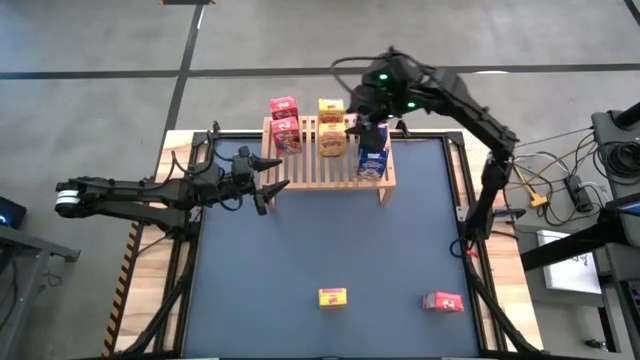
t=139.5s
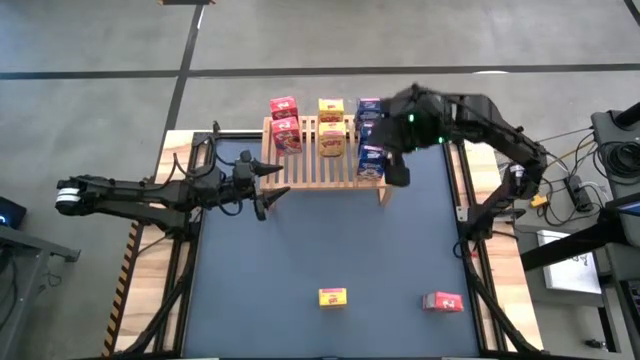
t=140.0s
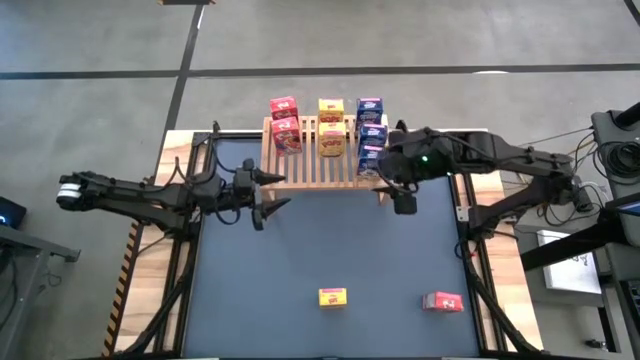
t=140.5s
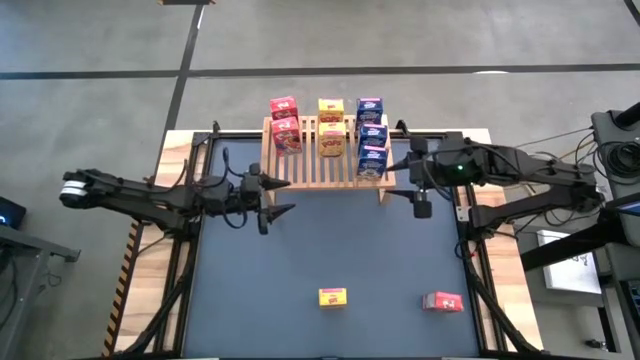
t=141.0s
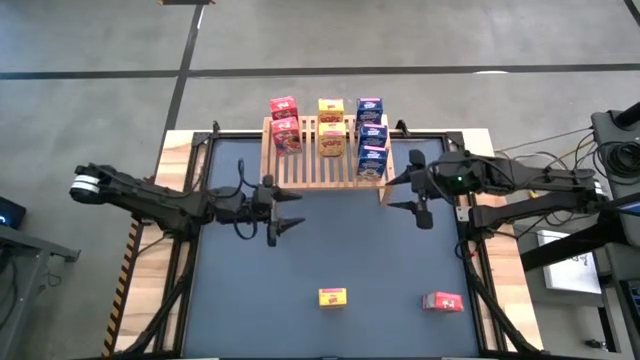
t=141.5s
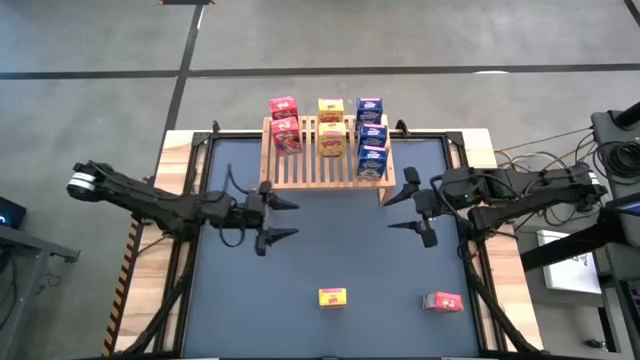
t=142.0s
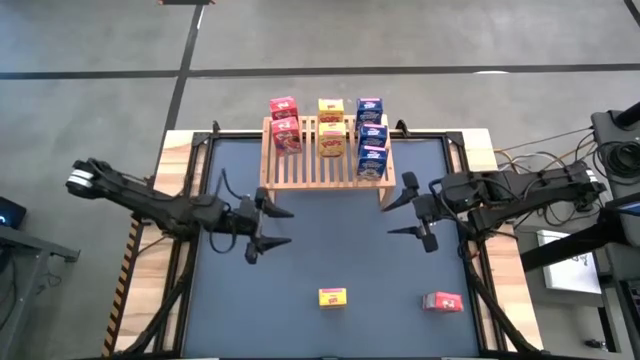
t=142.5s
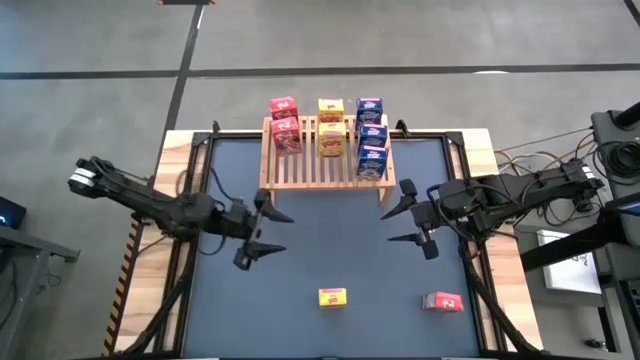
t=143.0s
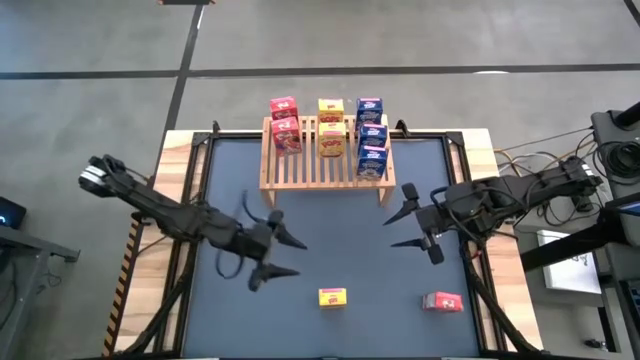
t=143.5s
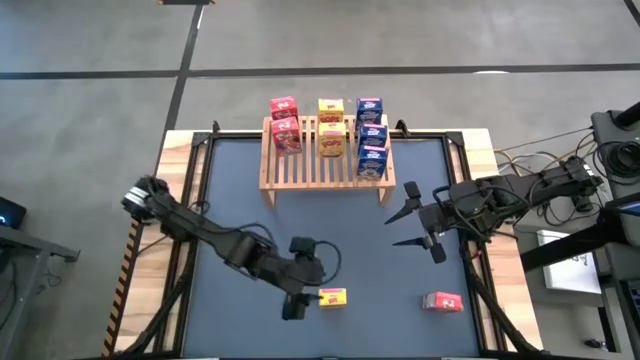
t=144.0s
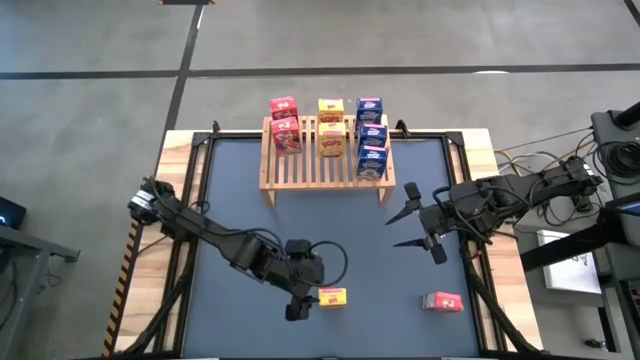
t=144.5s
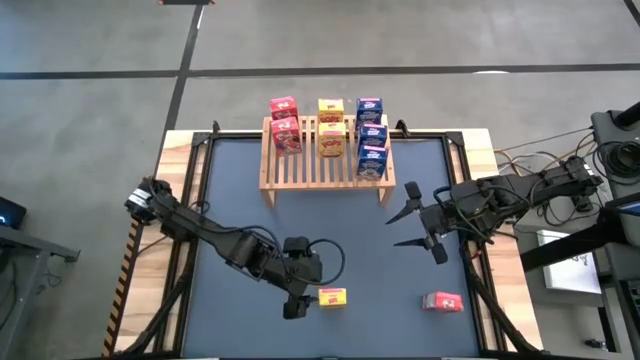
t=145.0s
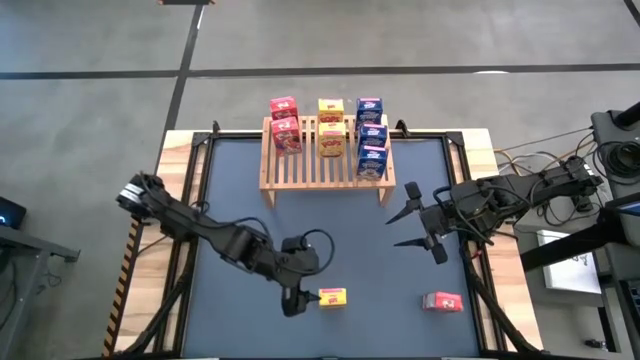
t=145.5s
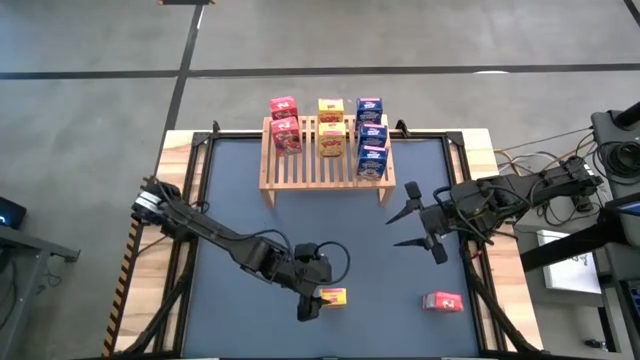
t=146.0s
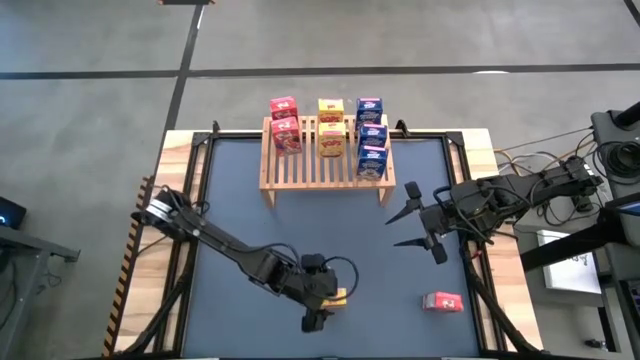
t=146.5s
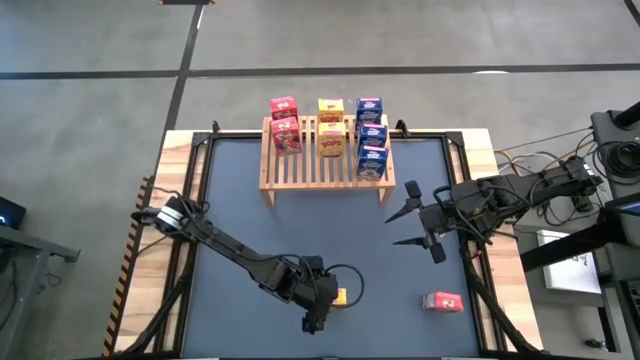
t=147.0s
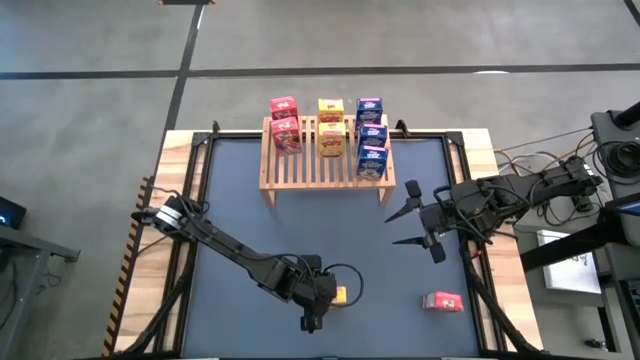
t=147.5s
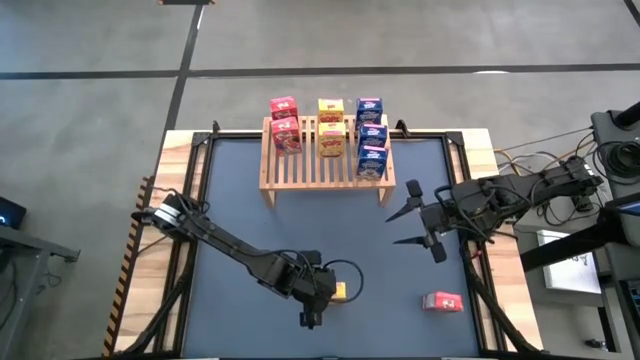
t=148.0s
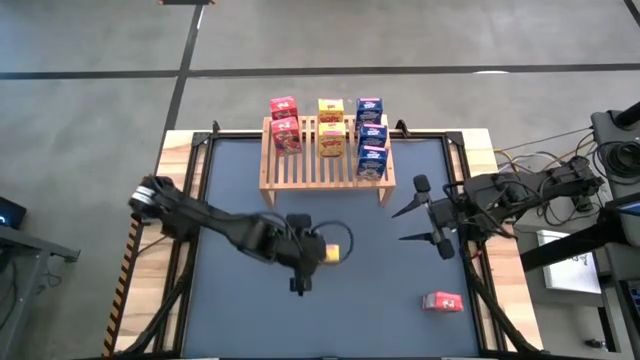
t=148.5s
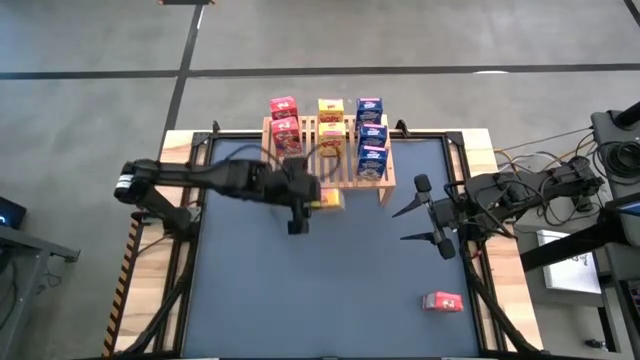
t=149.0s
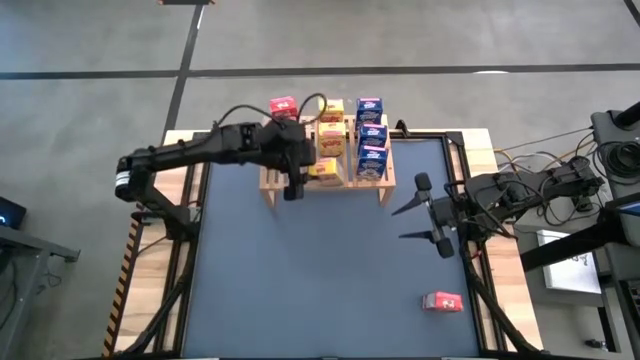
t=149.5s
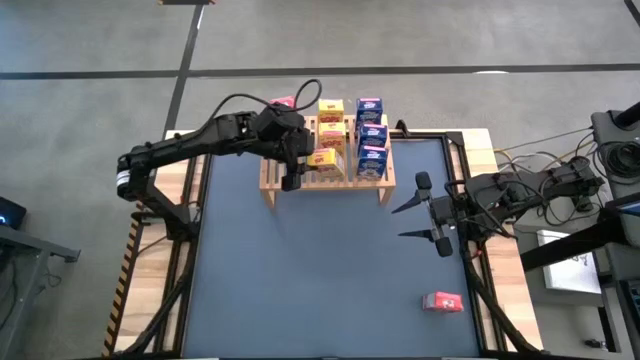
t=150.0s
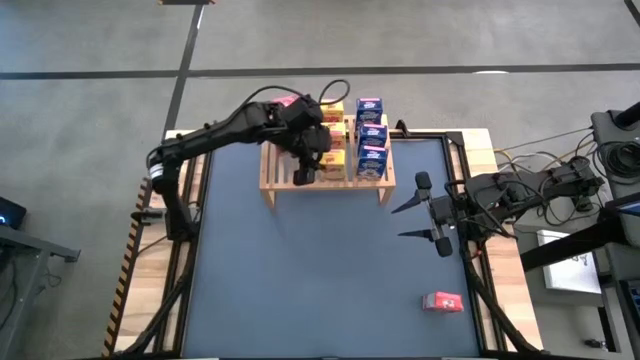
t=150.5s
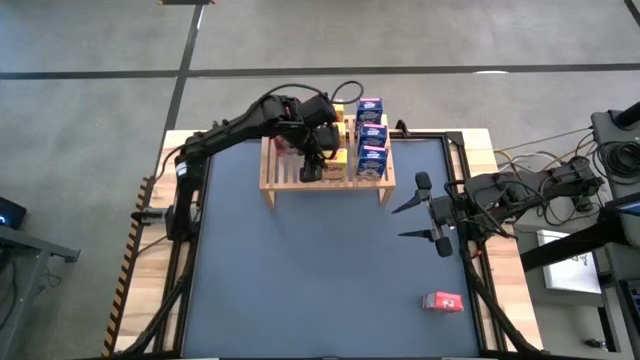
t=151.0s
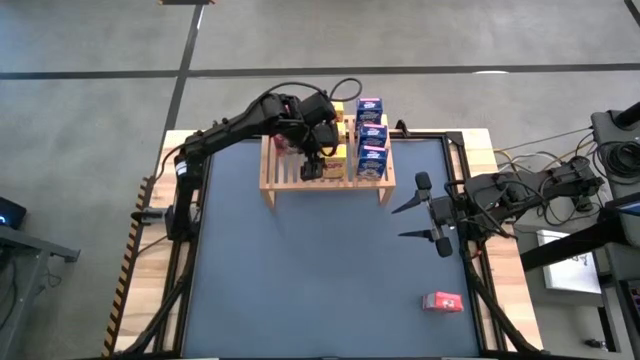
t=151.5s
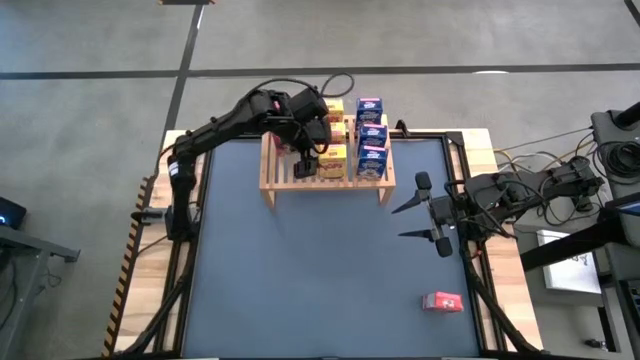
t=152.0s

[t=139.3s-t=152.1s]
Task: Stack cereal on shelf
Put the yellow cereal box on the shelf aligned with the yellow cereal boxes

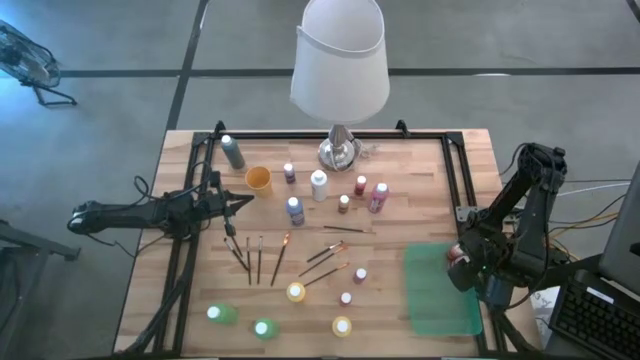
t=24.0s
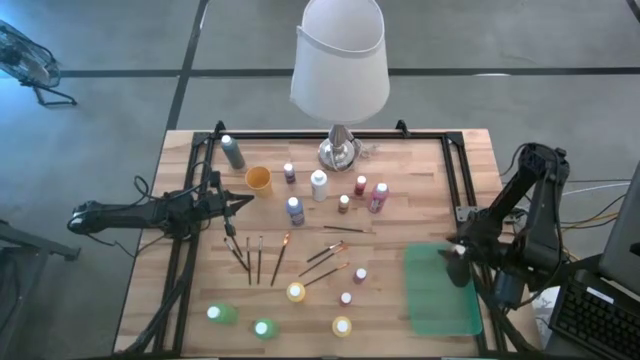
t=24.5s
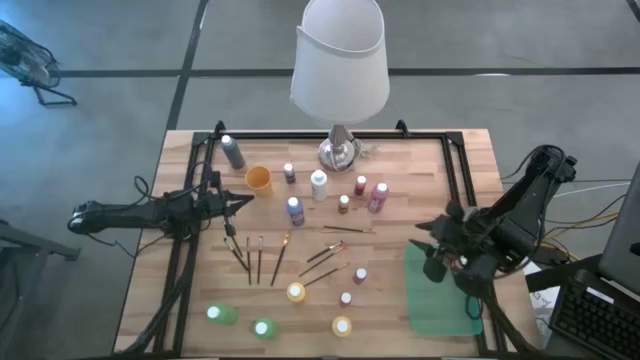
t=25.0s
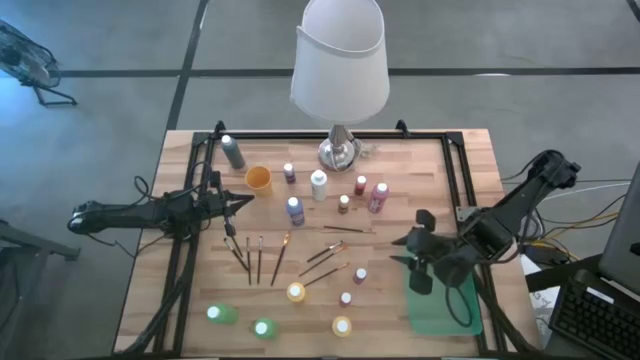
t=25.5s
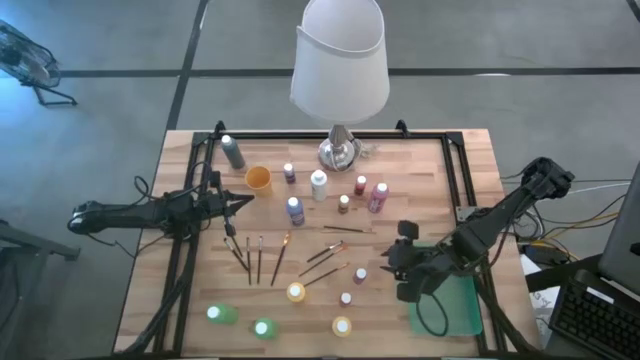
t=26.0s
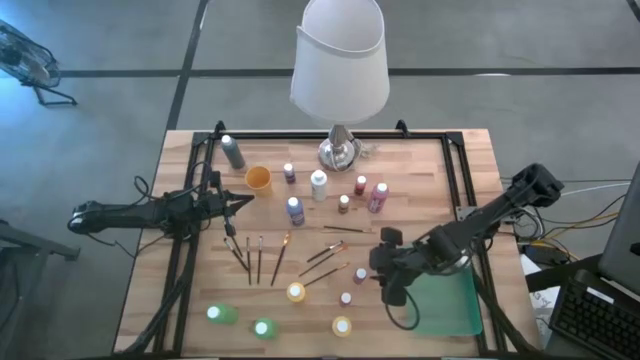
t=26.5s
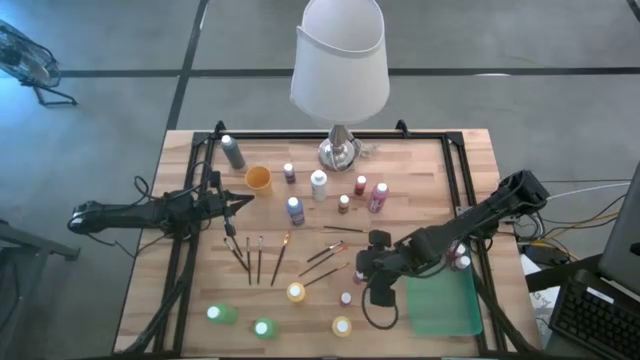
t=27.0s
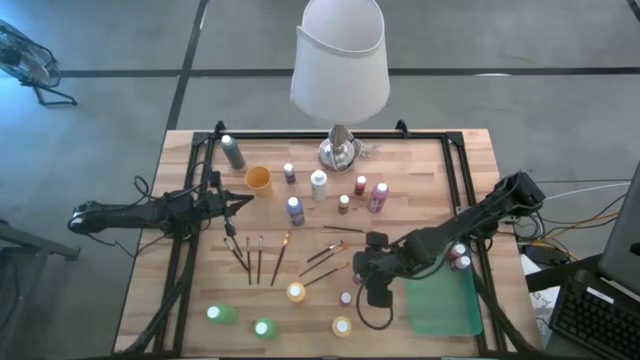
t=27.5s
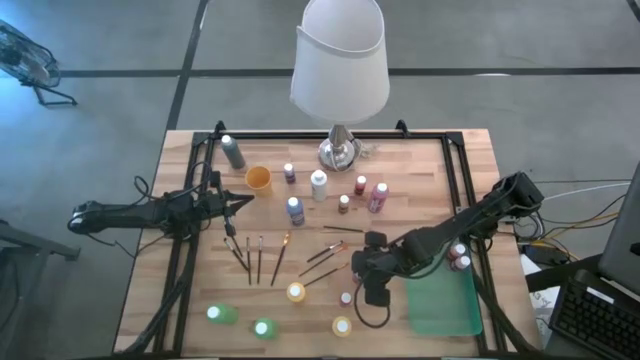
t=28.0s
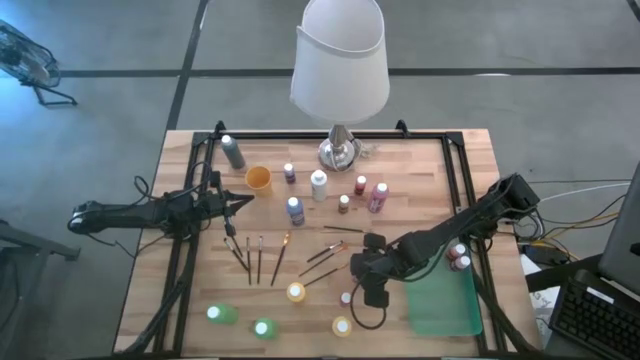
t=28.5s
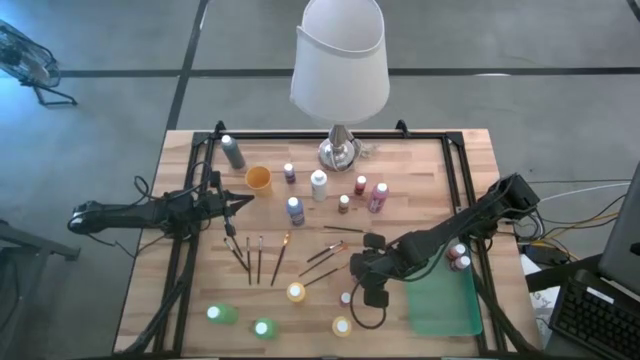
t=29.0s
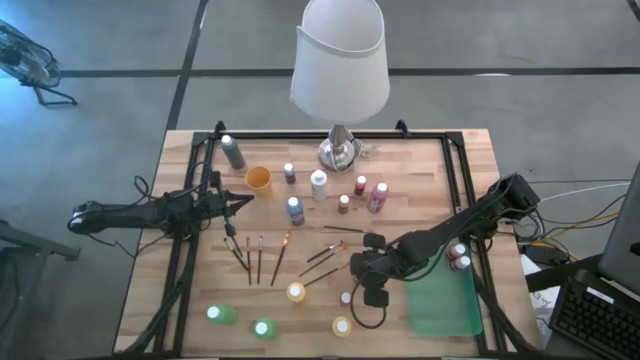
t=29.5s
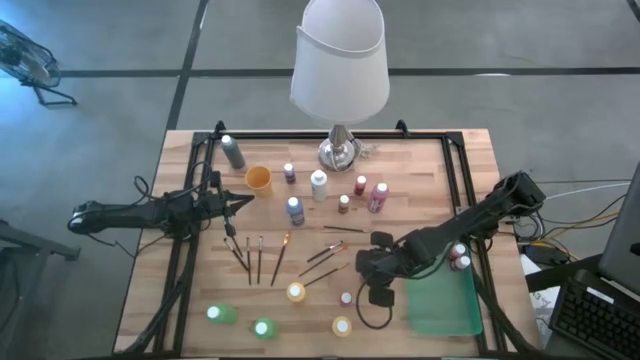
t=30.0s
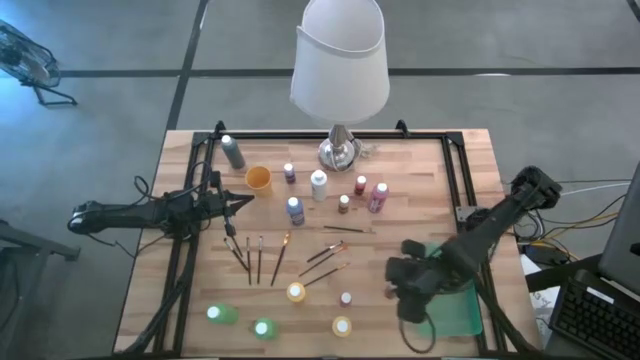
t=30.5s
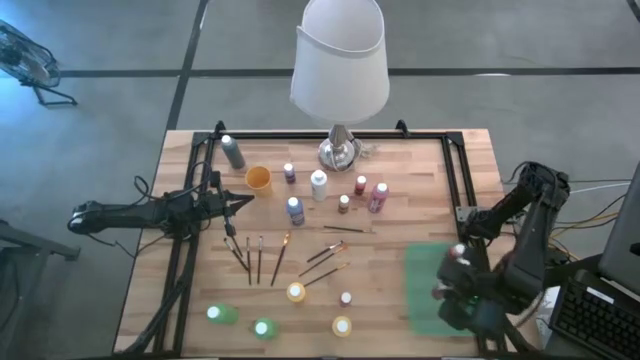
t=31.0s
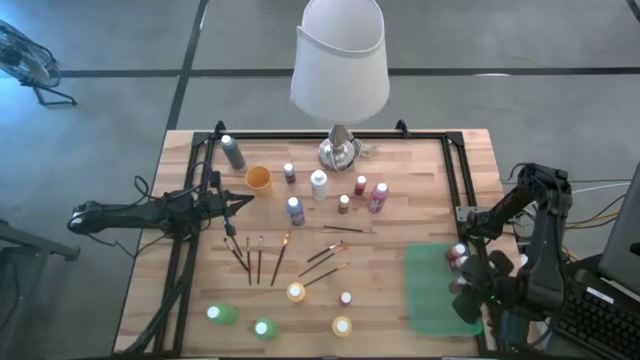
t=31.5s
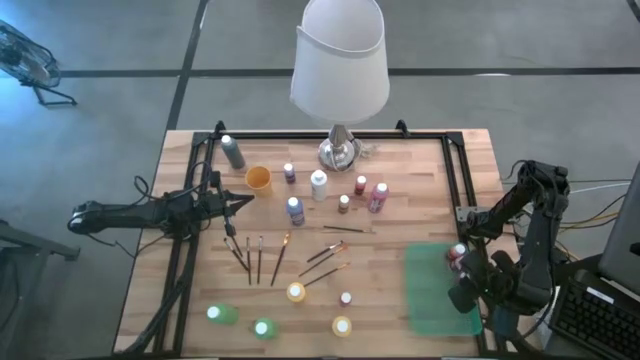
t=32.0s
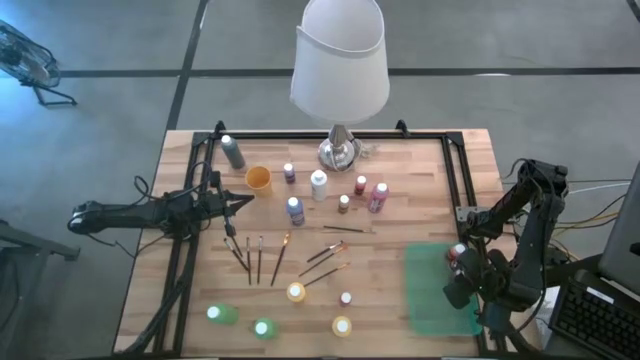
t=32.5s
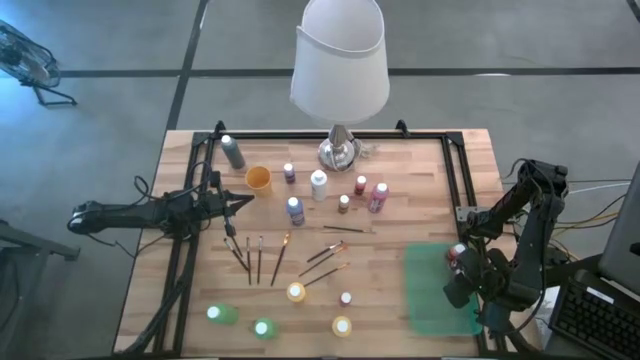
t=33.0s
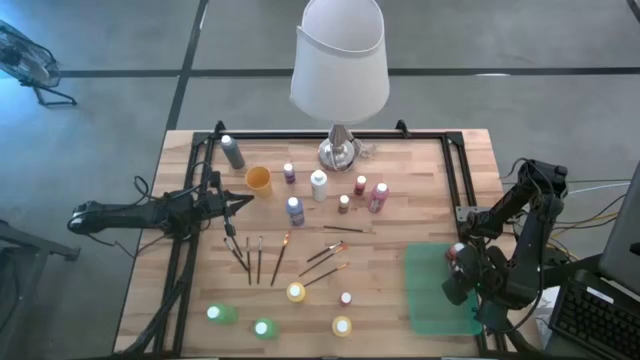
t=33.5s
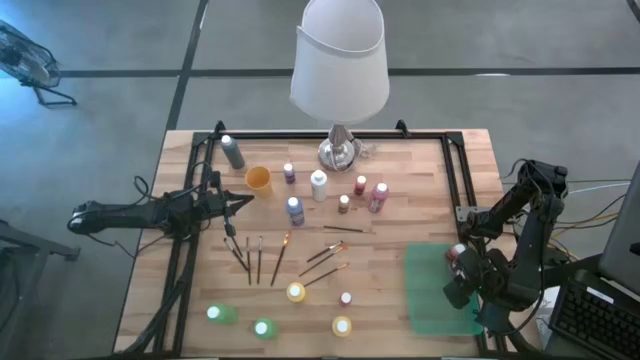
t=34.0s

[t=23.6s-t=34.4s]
Task: Pick & Place Paint Supplies
Put the pink bottle into the green bin
